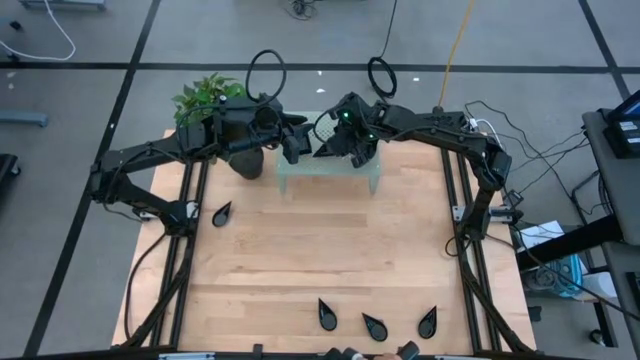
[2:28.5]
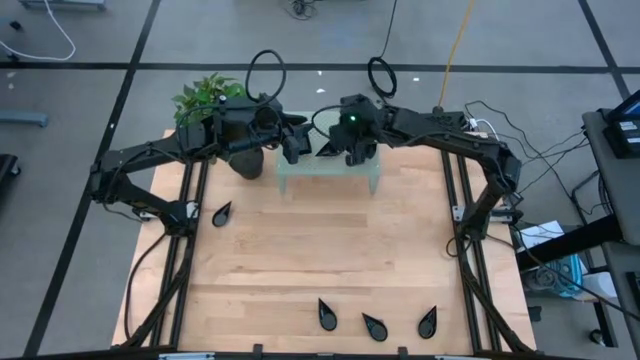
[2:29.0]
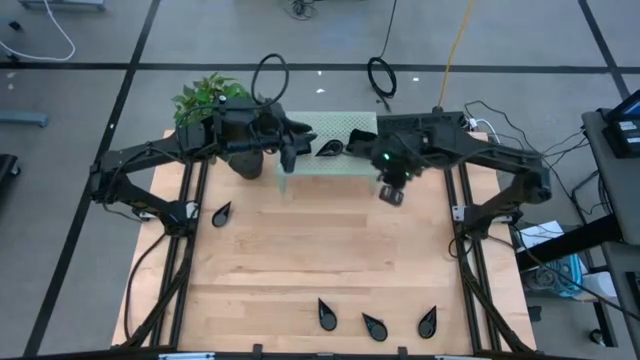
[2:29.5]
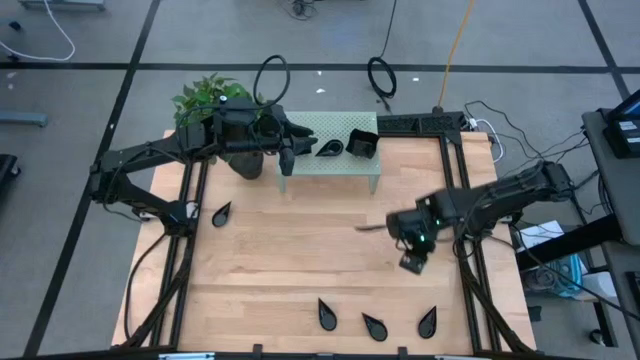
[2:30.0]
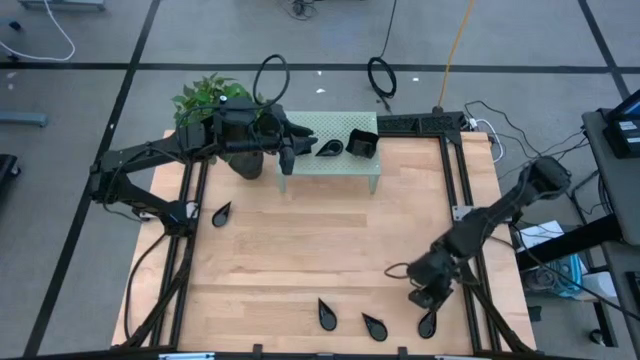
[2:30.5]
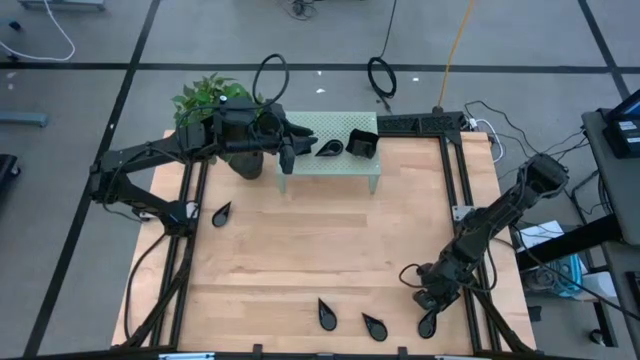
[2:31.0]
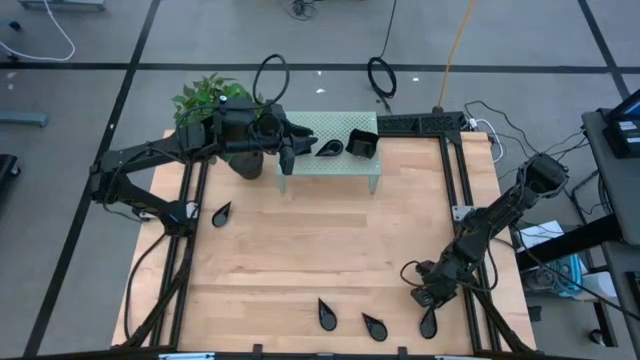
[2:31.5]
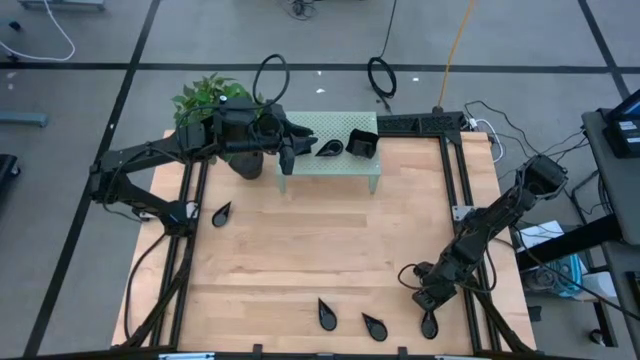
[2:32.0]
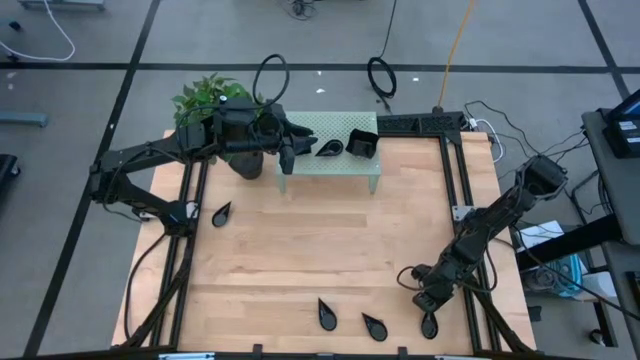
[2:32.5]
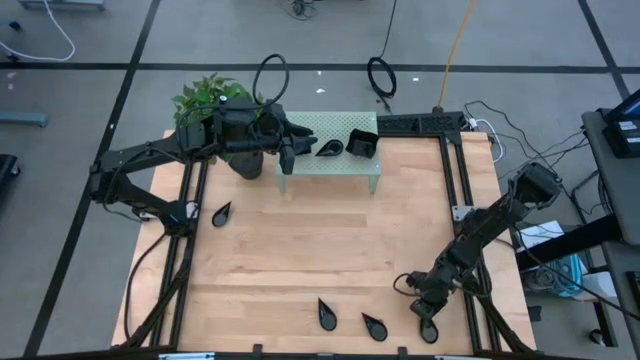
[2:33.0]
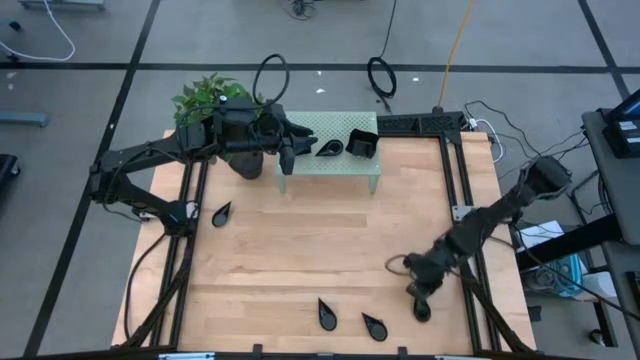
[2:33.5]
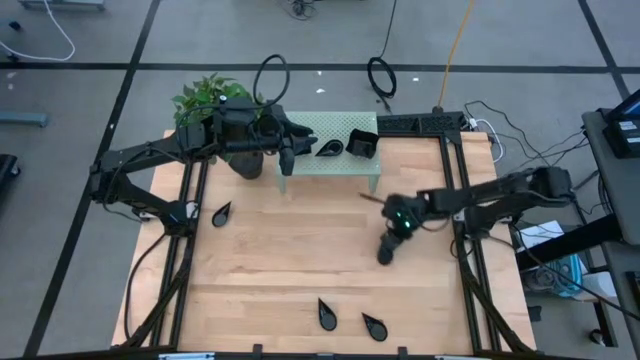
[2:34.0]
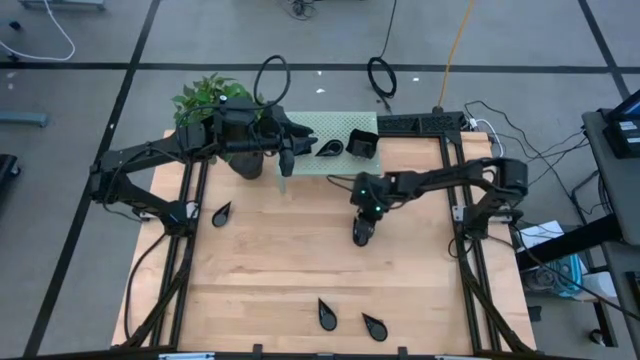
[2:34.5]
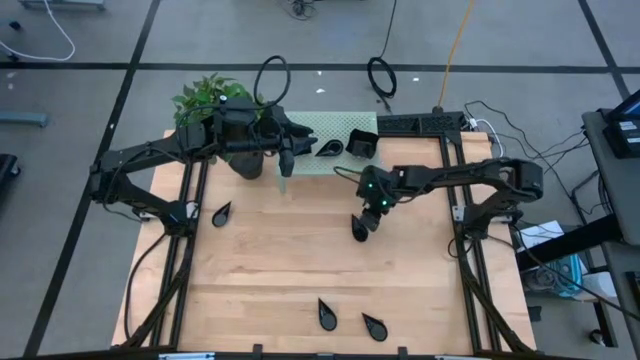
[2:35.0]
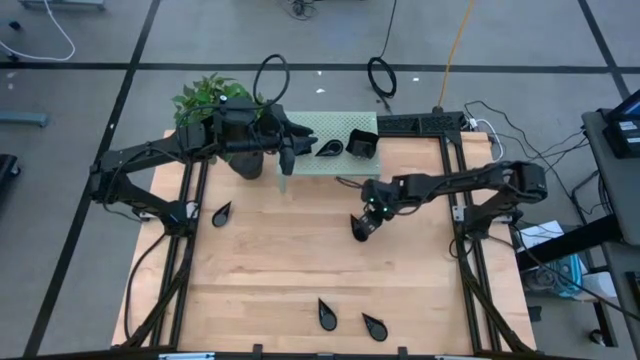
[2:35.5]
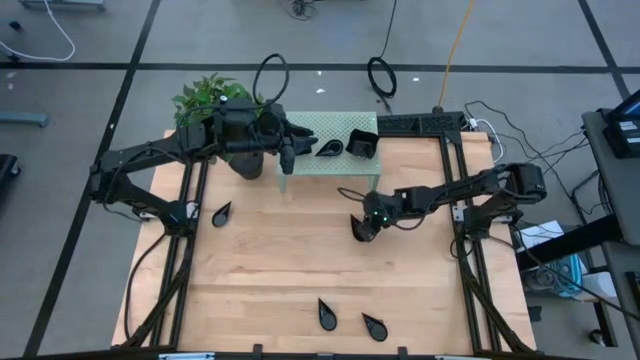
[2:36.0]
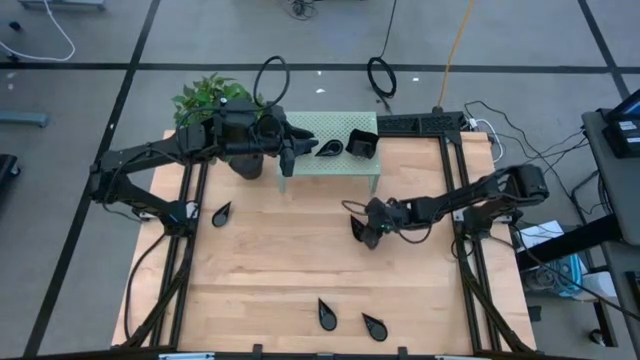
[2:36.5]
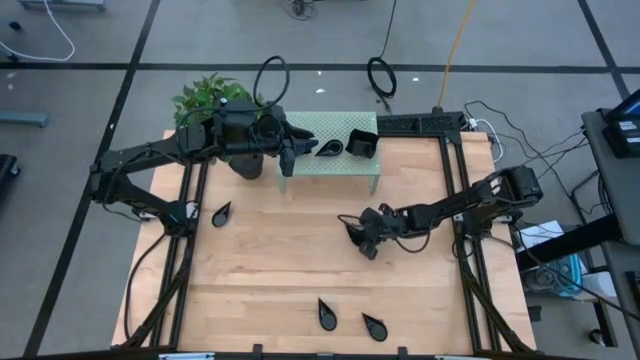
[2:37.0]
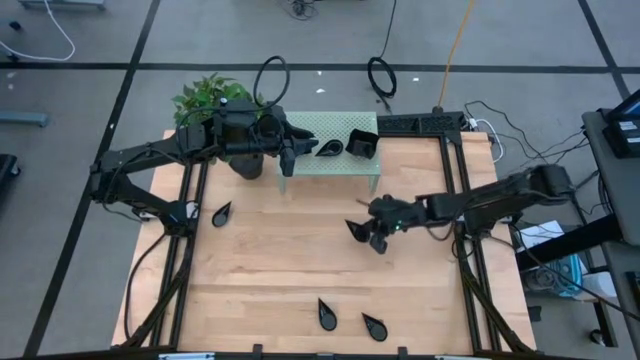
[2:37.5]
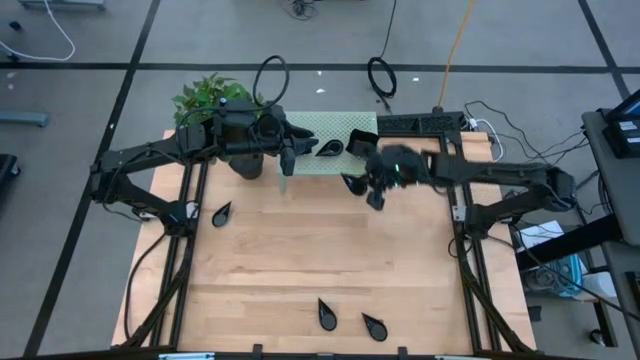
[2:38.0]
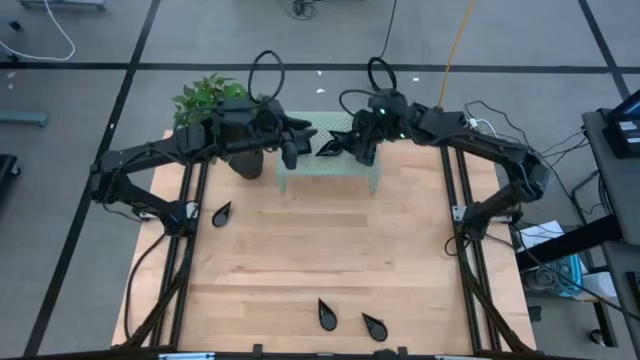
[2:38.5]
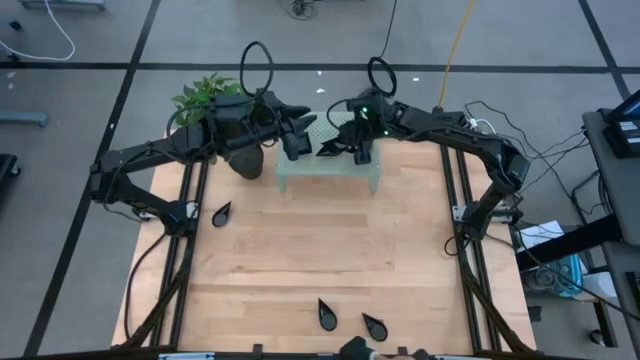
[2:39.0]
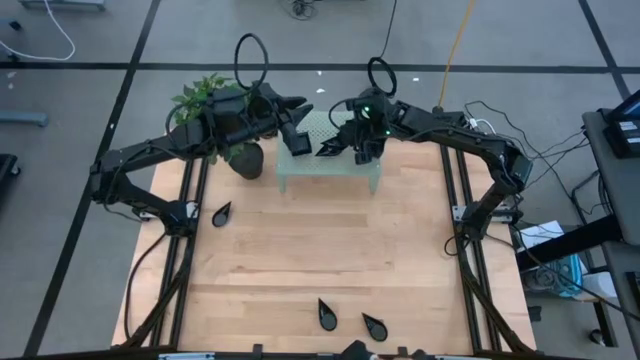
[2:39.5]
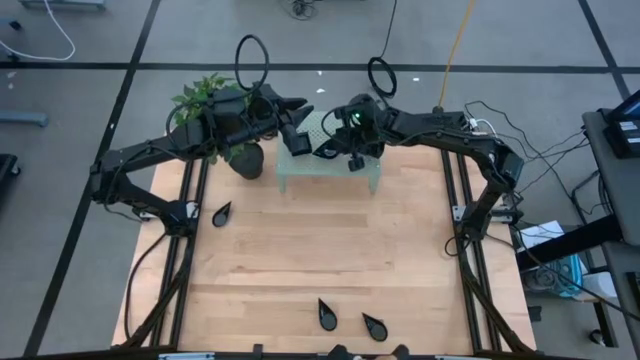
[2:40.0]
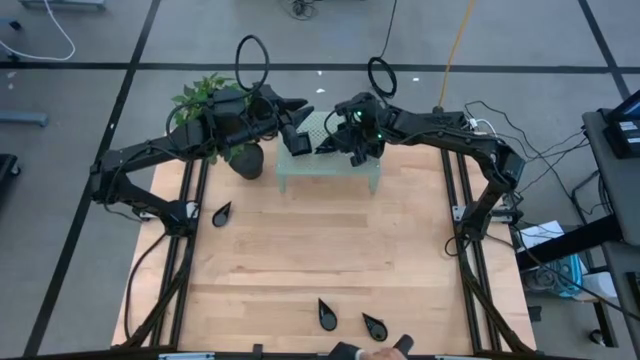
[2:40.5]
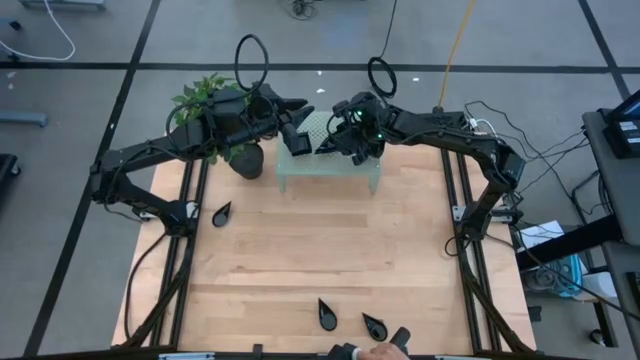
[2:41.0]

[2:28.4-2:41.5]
Task: Pick & Place Mini shaped plates
Stack the drop shaped plate on top of the other drop shaped plate on the shelf

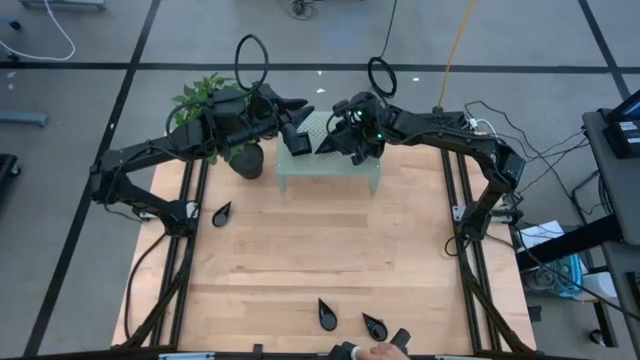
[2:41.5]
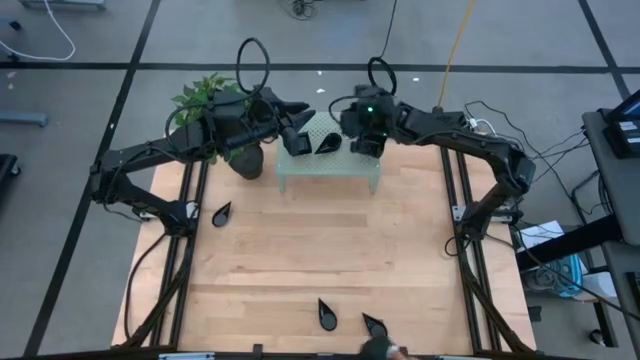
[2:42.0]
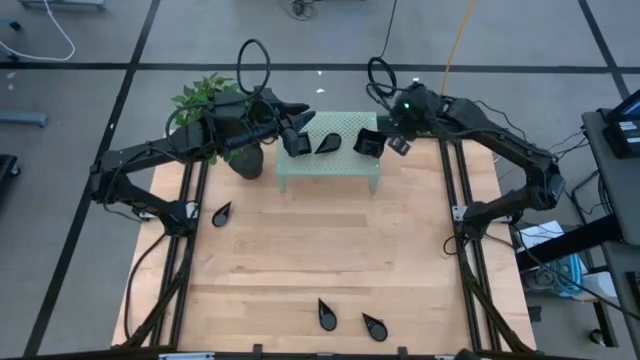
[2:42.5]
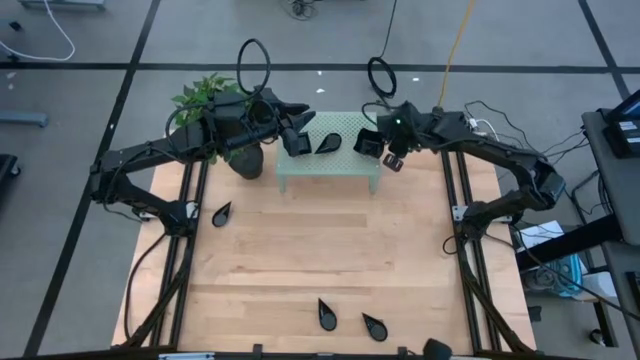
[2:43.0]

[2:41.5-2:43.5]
Adjust the distorted square plate on the shelf

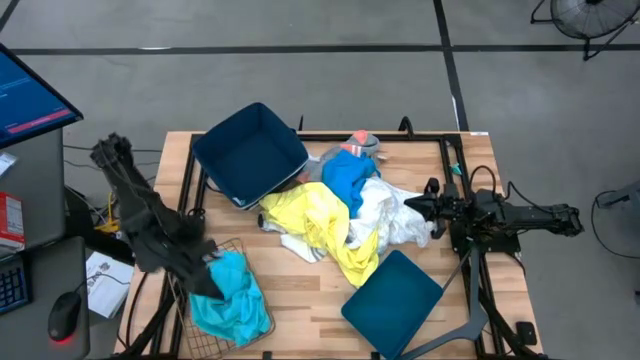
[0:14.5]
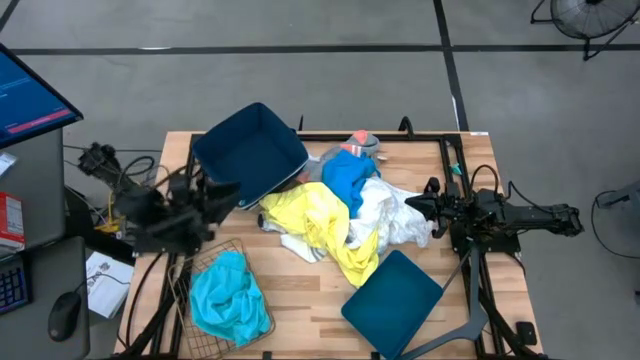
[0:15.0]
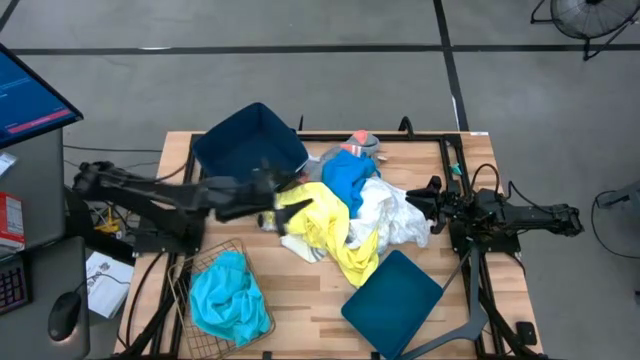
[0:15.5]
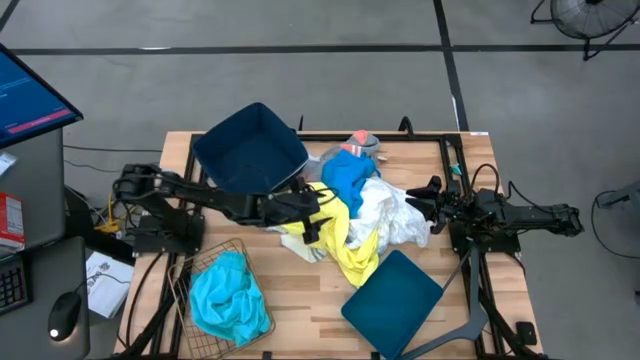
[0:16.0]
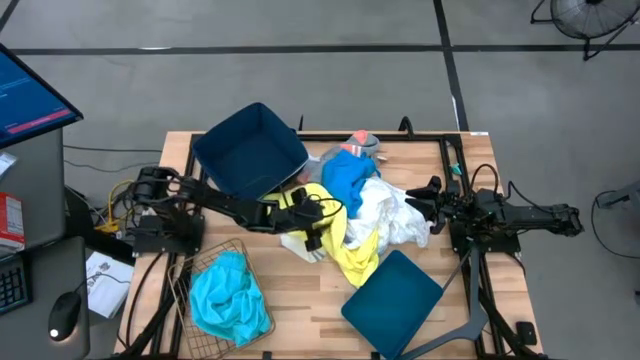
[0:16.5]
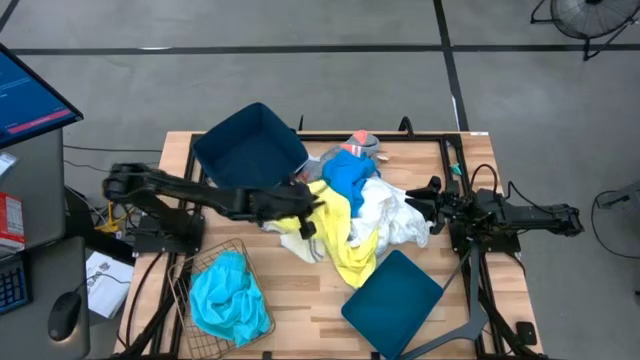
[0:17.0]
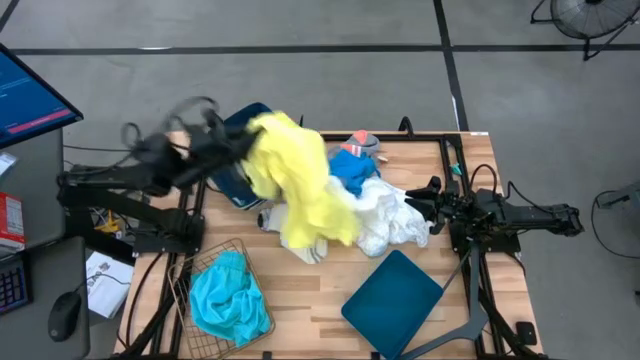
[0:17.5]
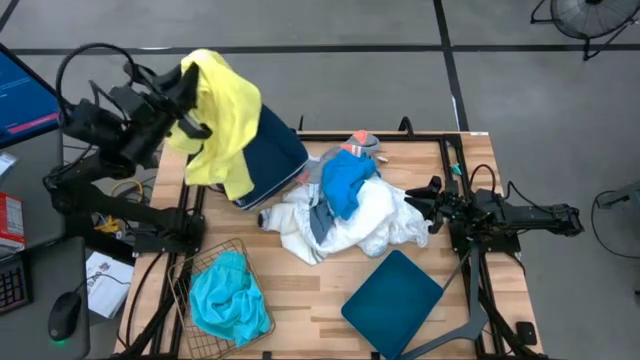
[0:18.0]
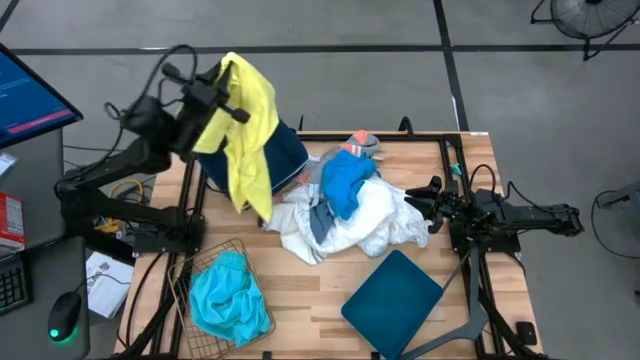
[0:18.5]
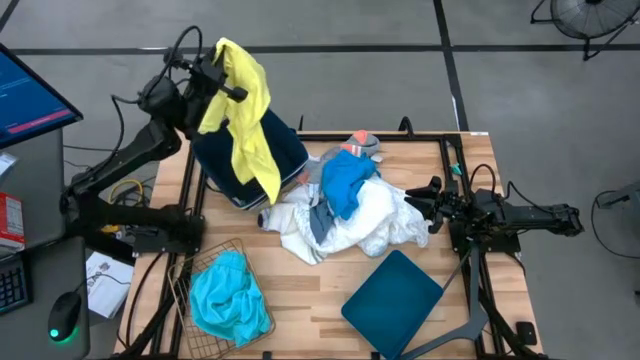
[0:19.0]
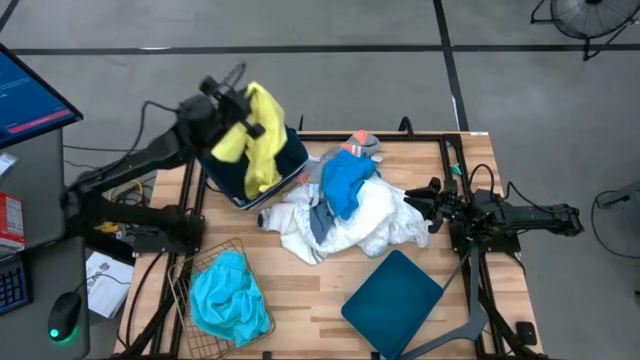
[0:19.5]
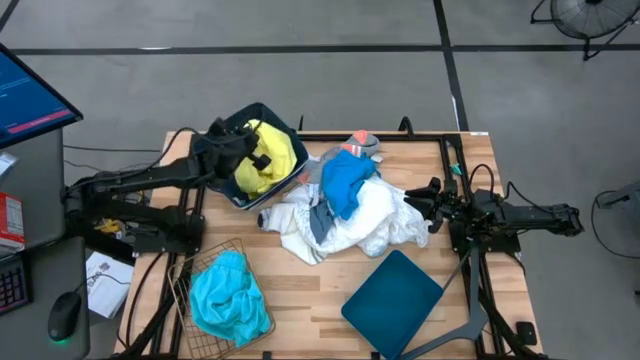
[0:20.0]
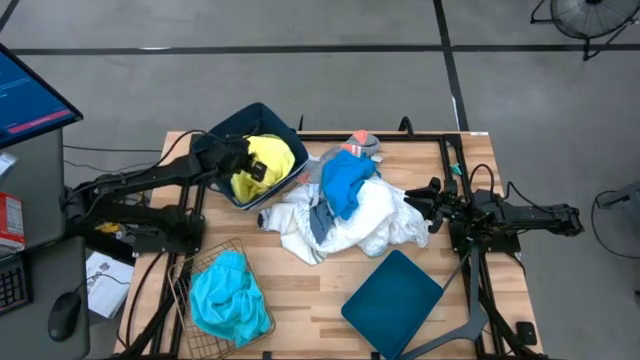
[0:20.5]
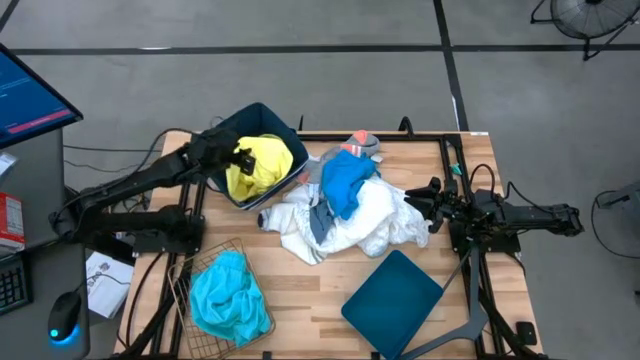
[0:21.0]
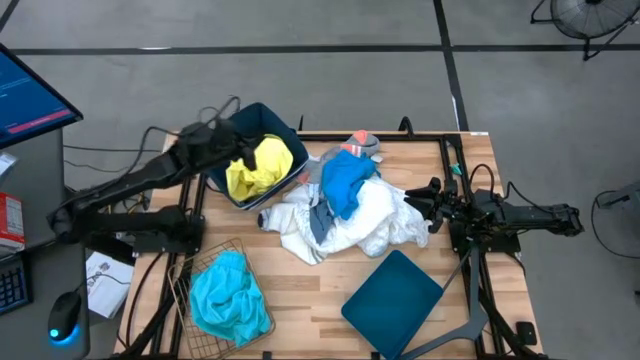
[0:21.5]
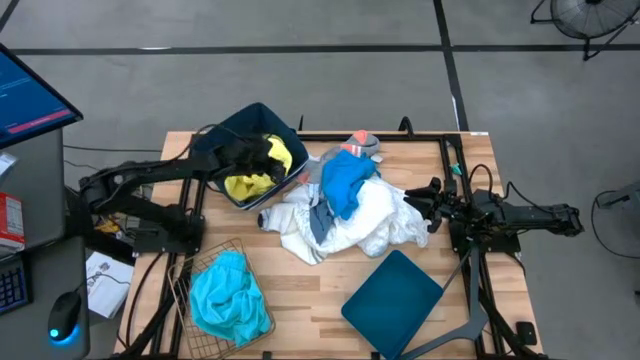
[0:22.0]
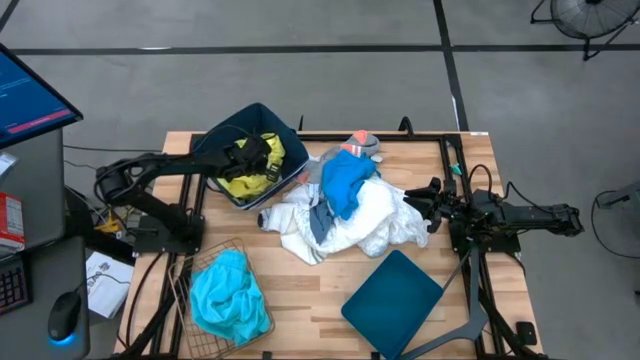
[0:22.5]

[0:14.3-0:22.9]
Task: Pick & Place Cloths
Put the yellow shirt into the blue laundry organizer
